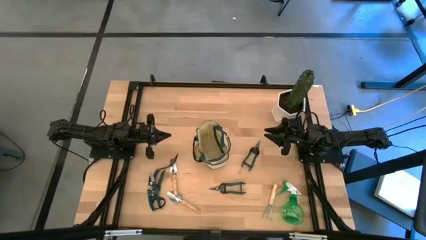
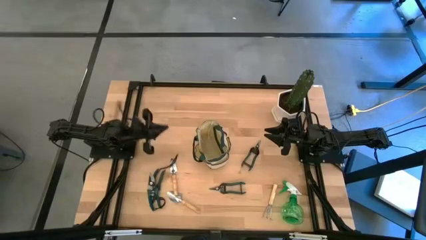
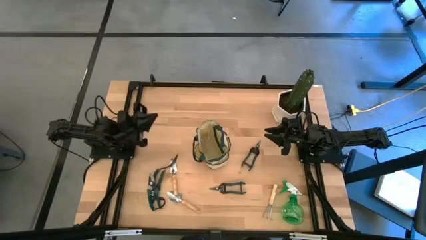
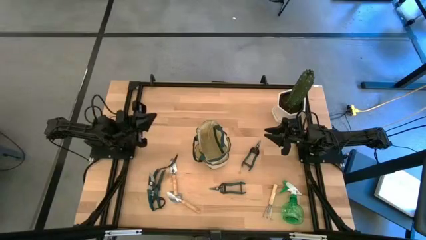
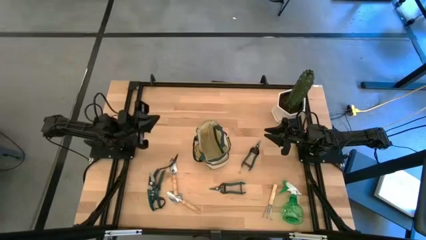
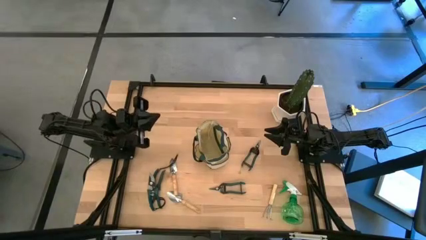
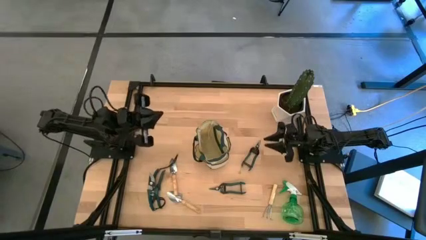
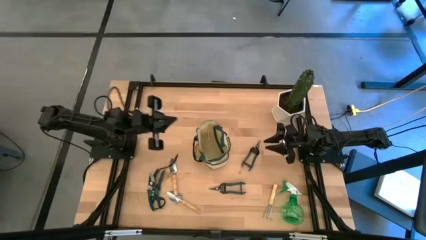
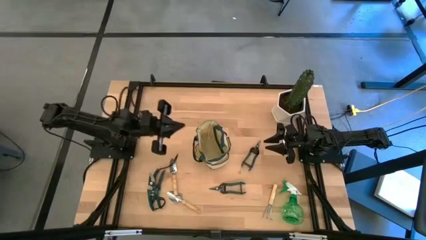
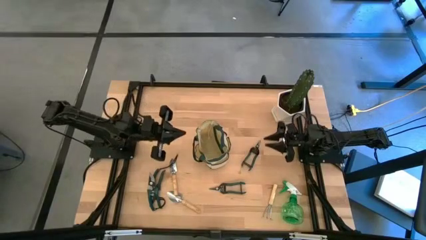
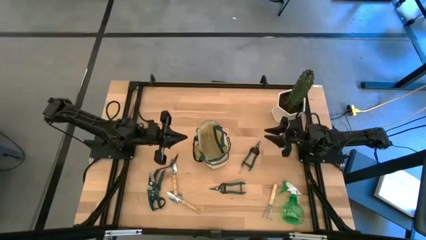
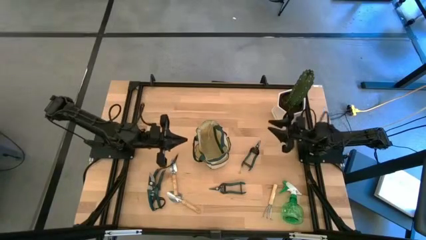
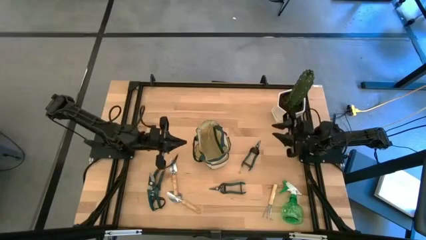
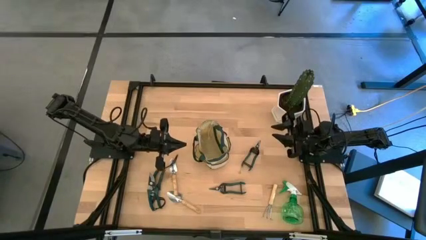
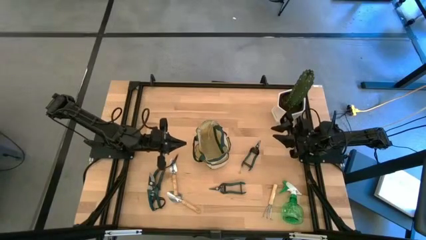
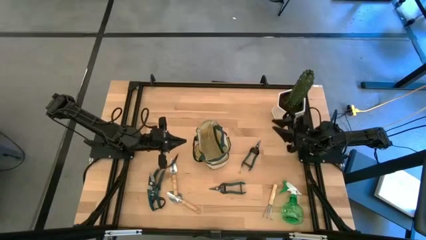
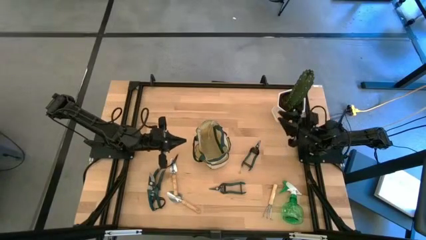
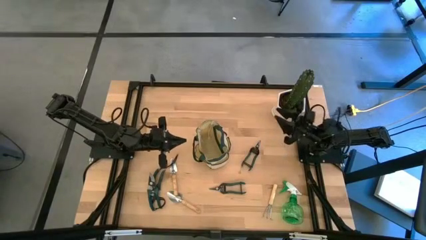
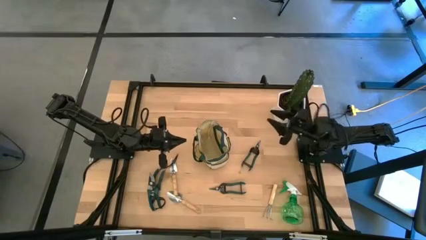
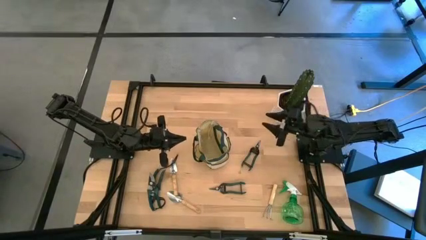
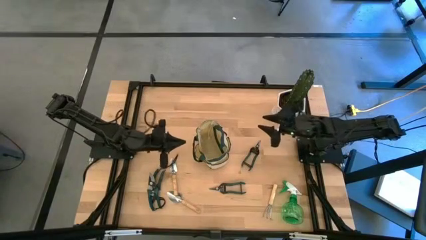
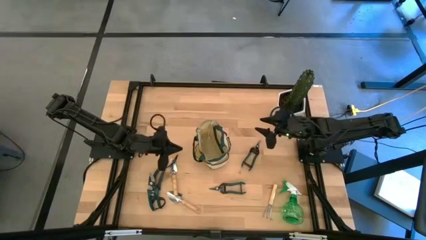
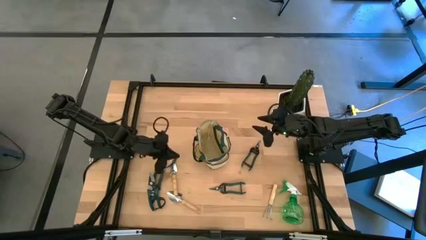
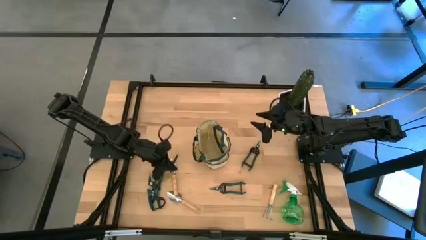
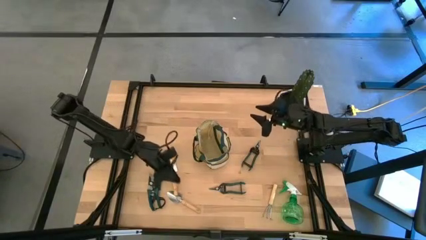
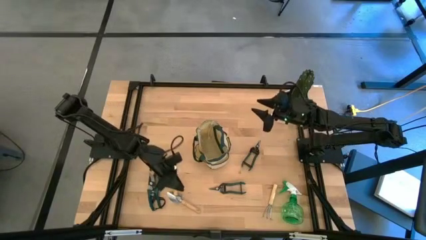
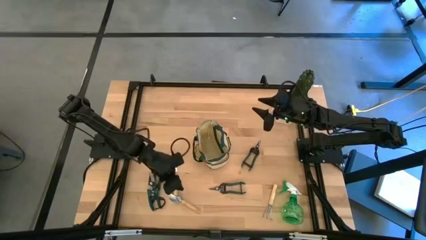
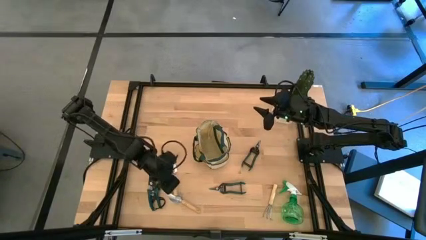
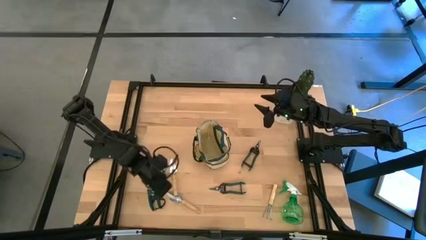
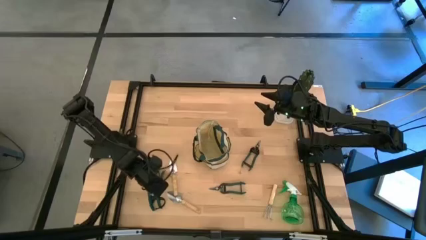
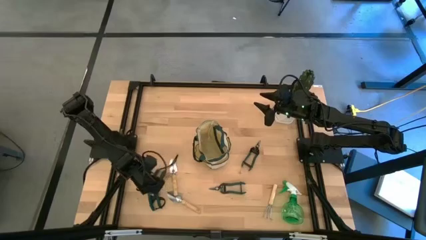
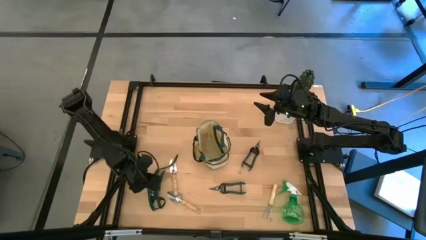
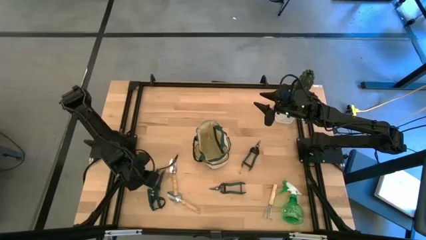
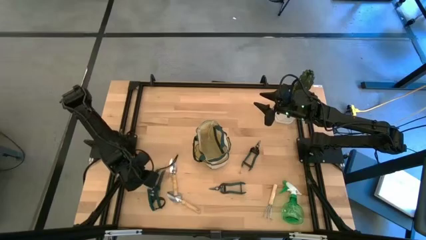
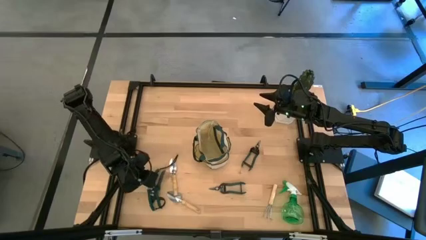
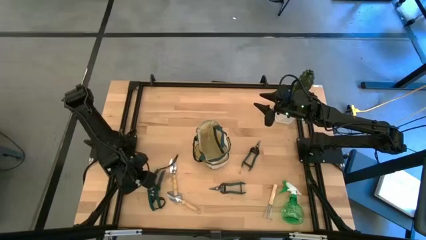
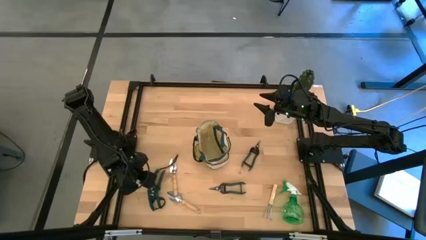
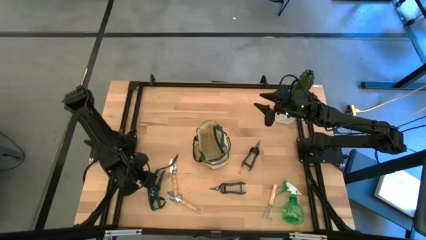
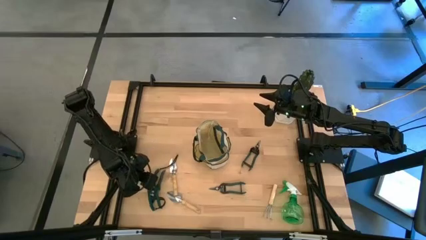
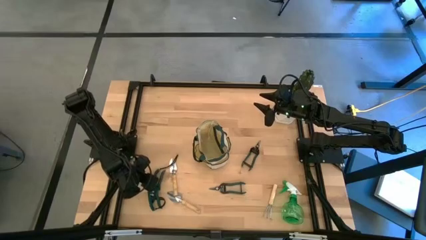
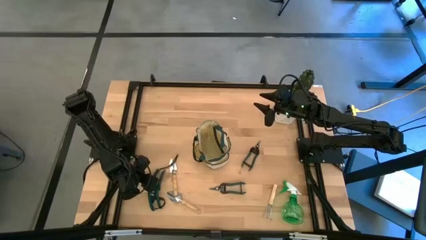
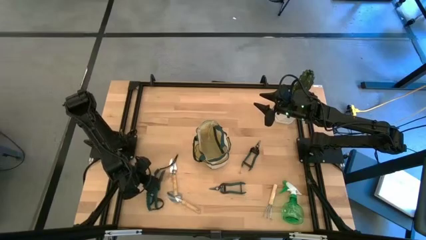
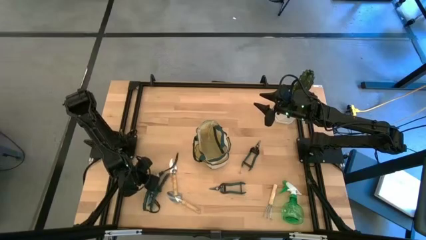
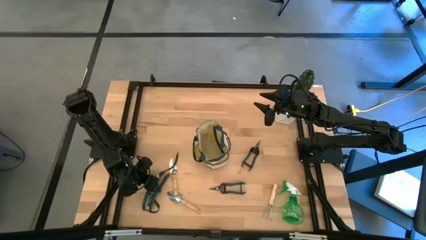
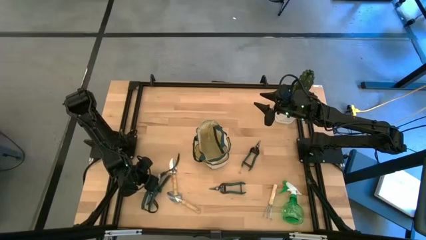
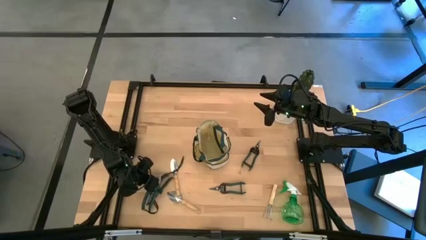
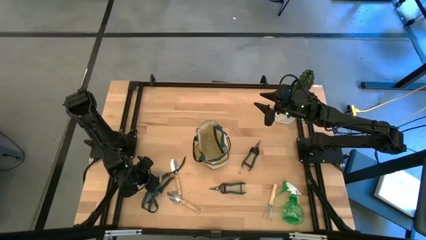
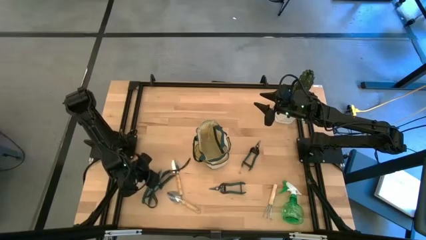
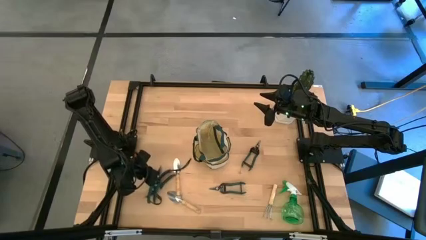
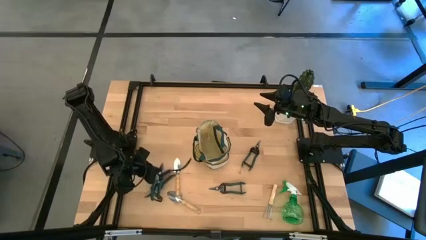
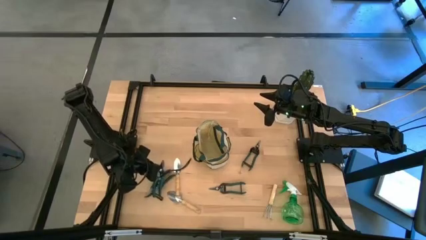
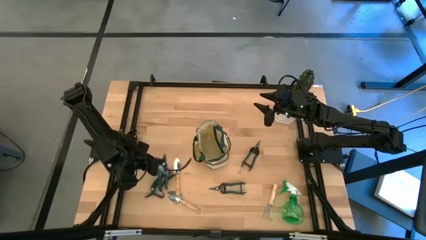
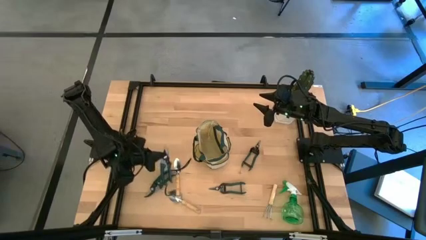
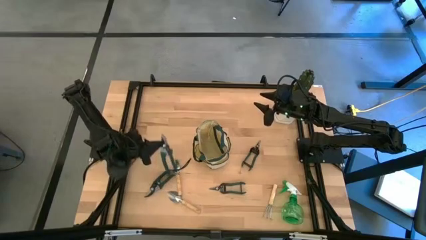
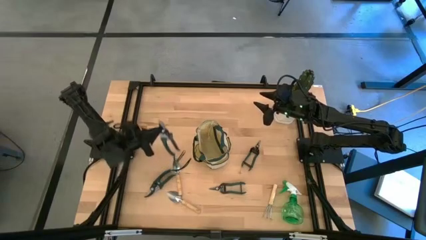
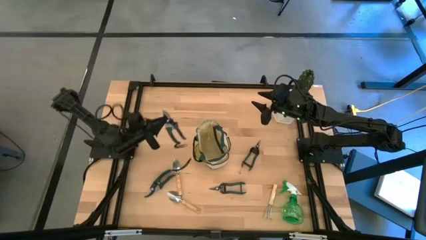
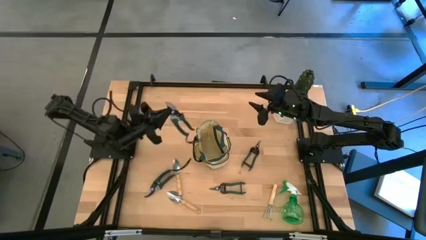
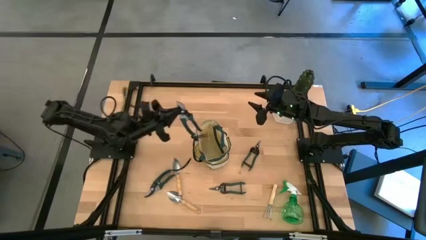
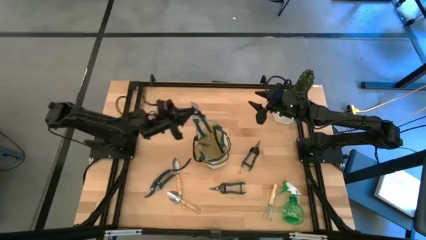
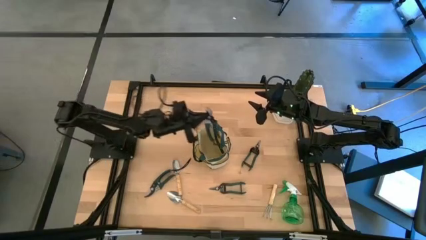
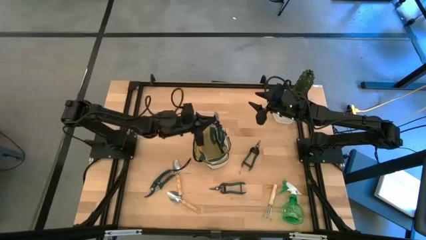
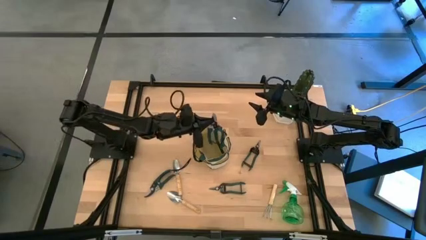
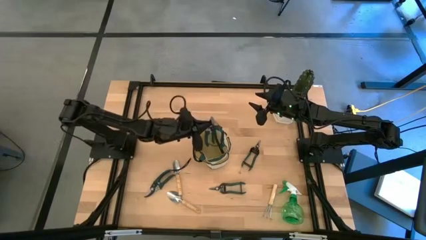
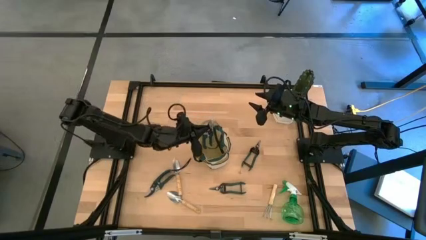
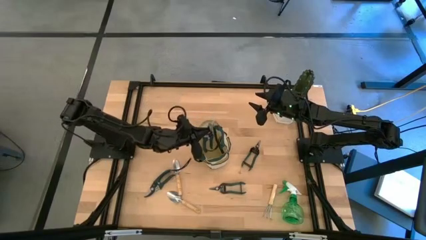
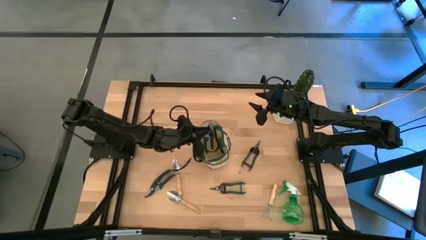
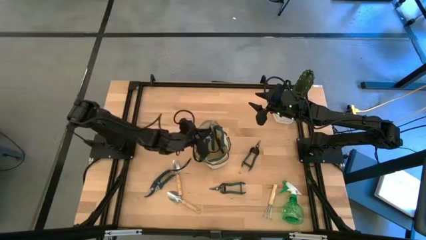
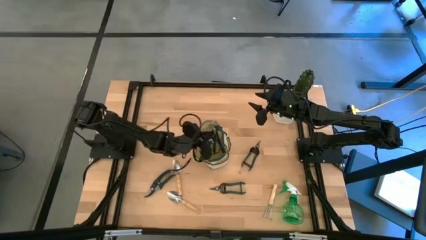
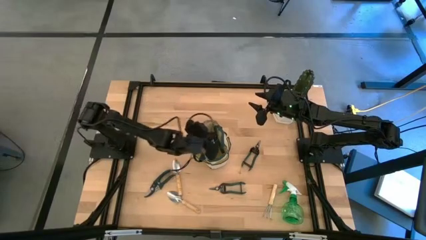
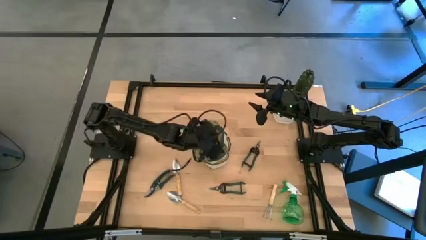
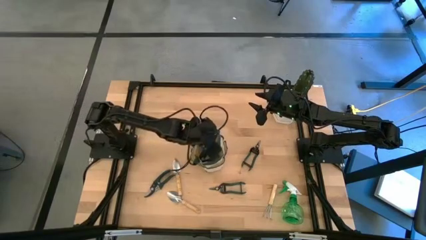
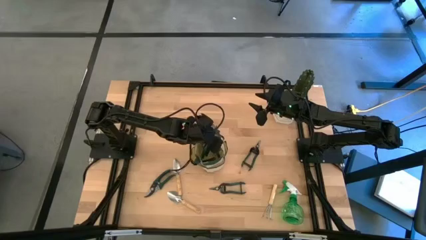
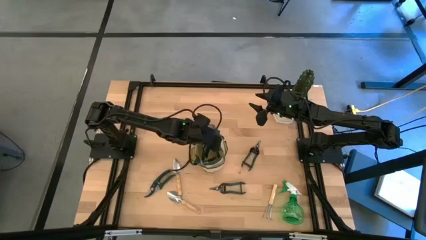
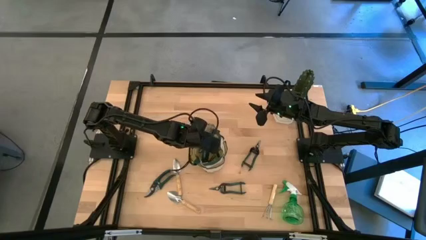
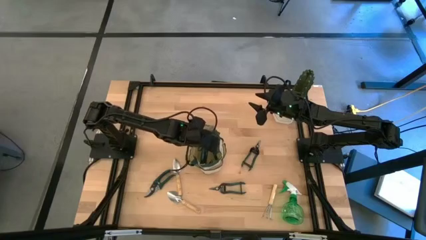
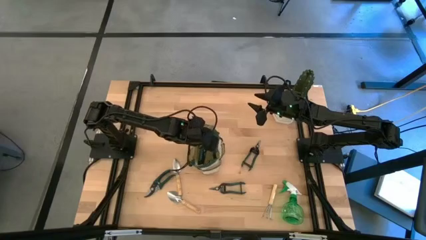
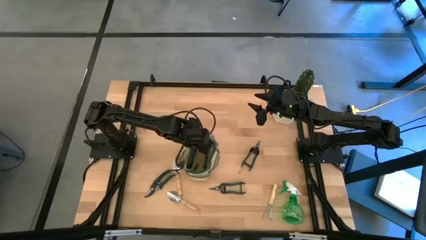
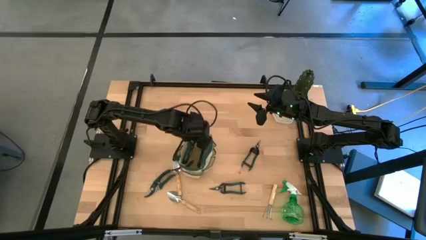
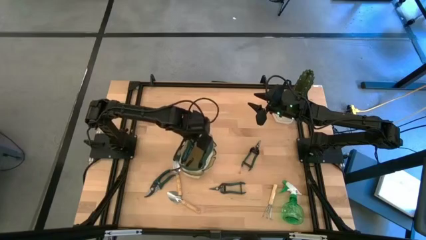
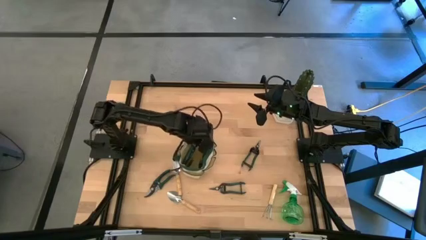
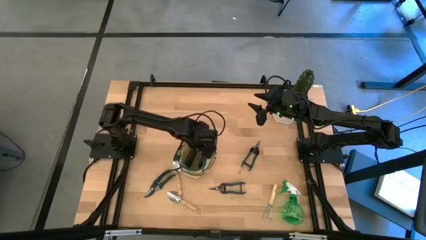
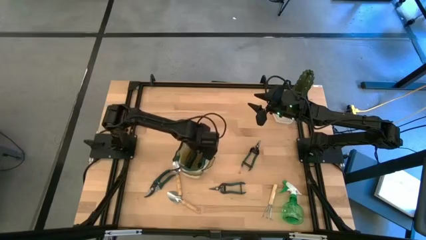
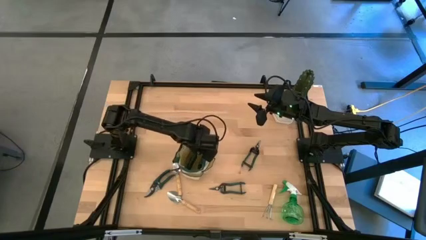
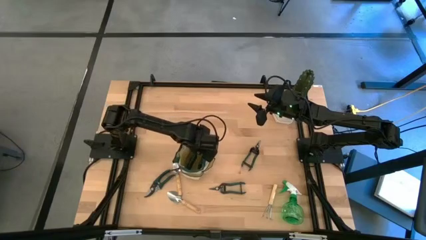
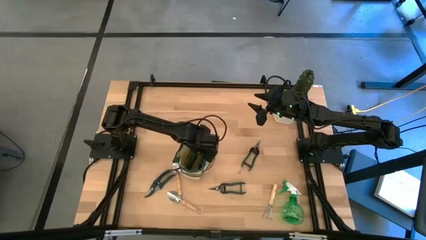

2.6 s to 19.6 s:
Task: Pick & Place Garden tools in Gardening bag
Put the top green shear scissors into the green gardening bag
